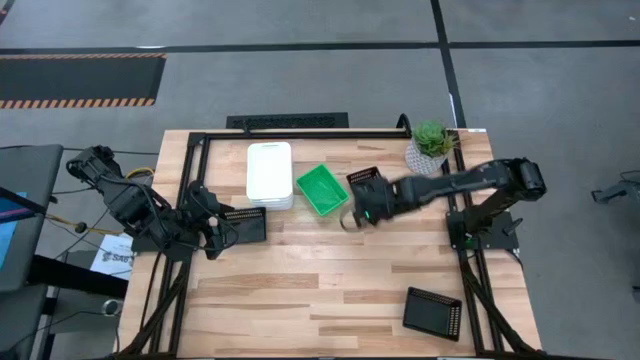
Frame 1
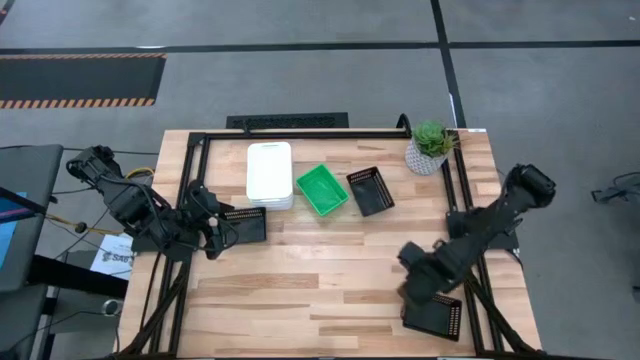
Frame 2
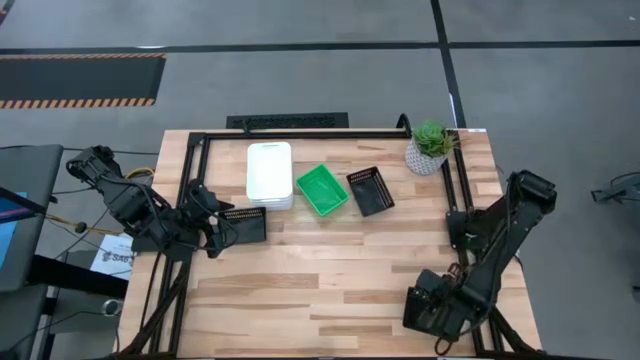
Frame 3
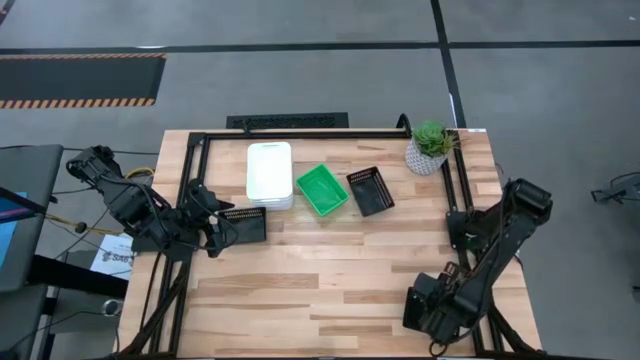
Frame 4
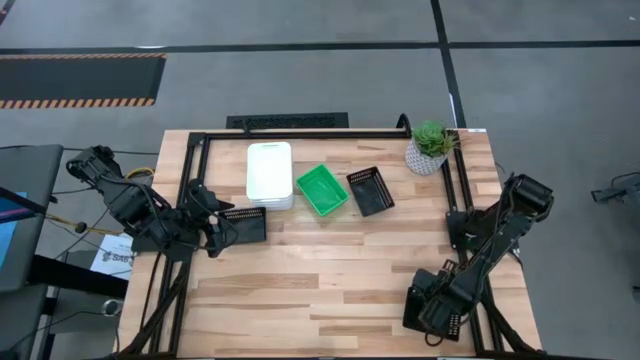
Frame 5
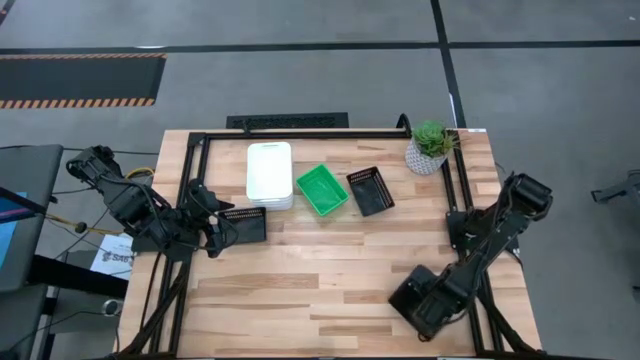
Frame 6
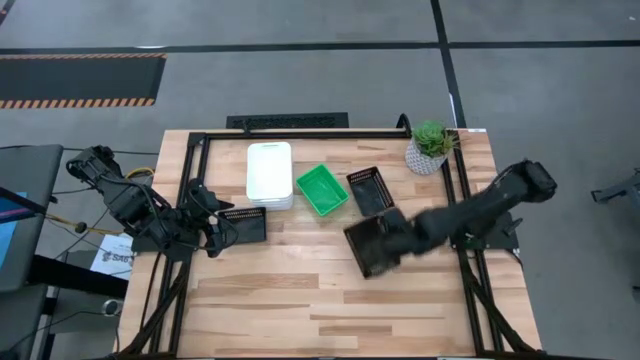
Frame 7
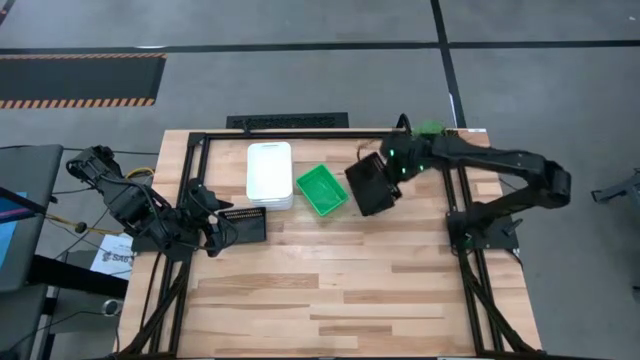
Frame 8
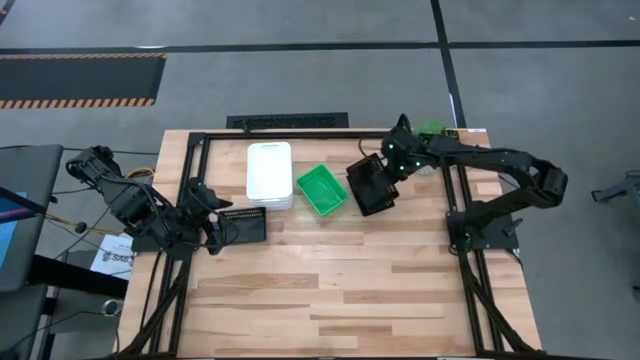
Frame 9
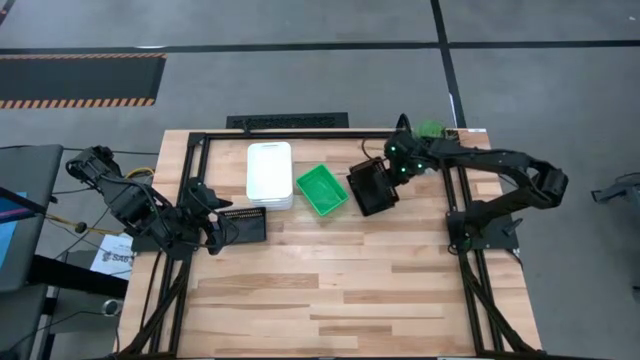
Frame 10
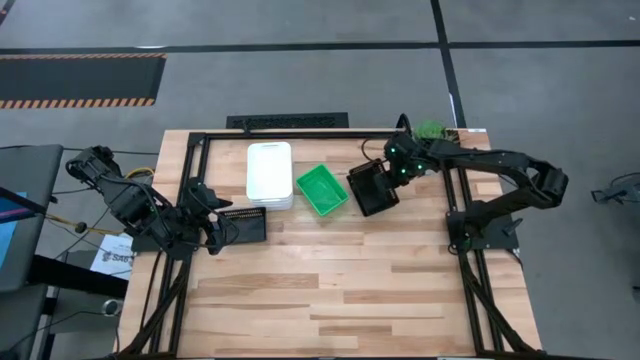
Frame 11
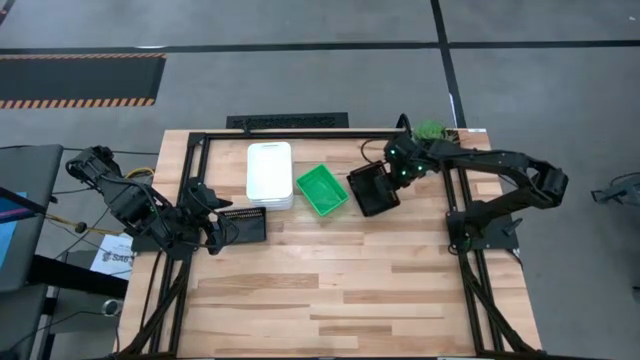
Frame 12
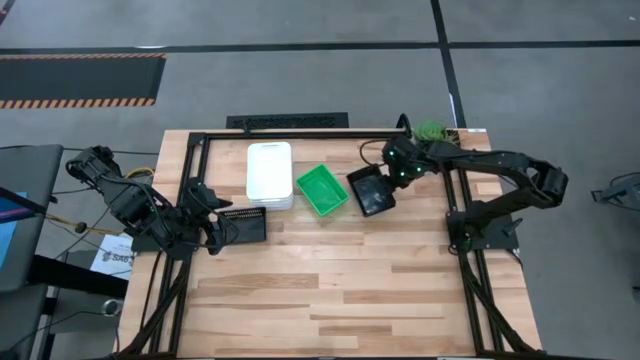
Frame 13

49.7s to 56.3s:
Stack the bottom black bin on top of the top black bin

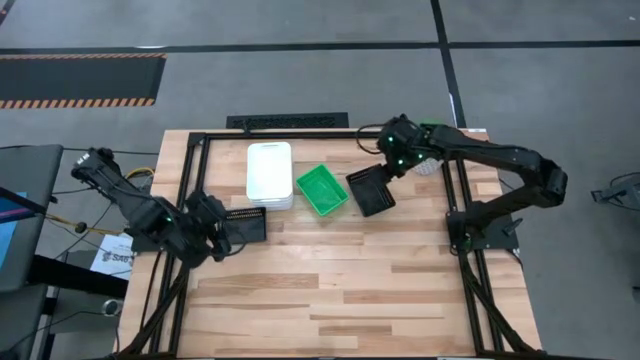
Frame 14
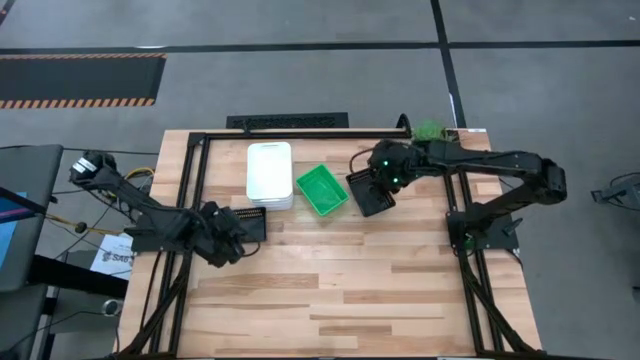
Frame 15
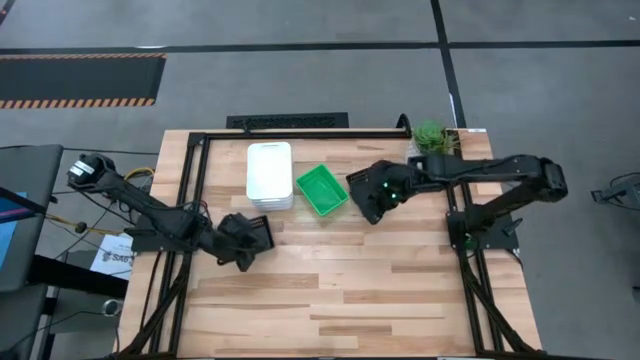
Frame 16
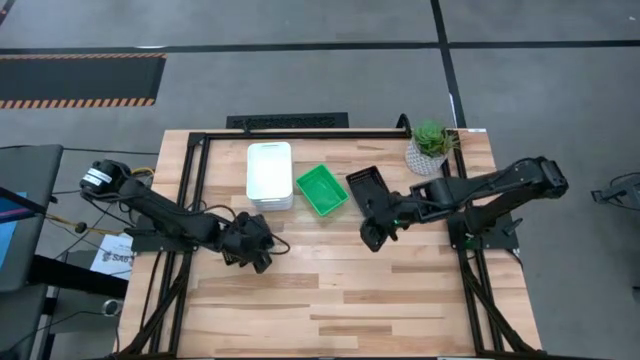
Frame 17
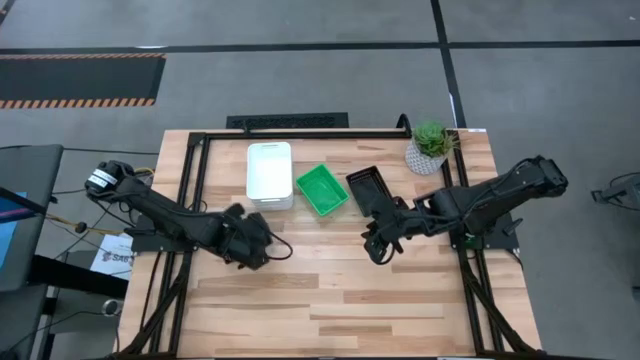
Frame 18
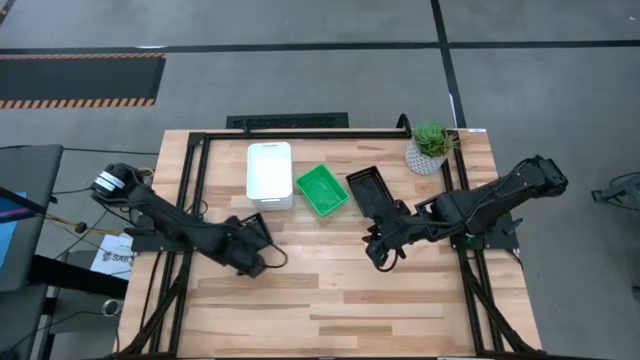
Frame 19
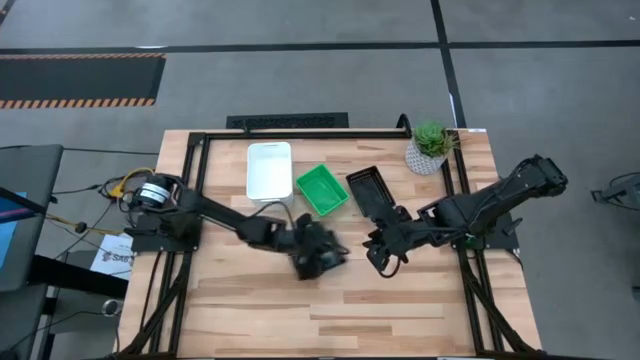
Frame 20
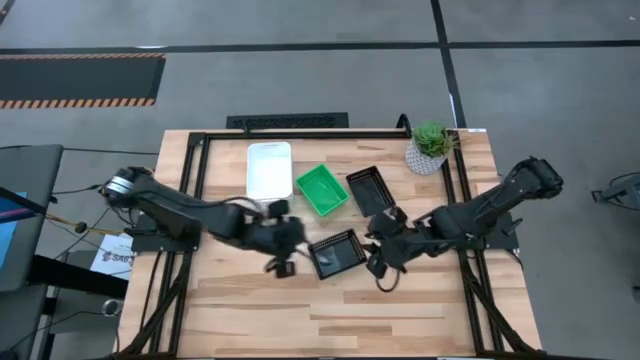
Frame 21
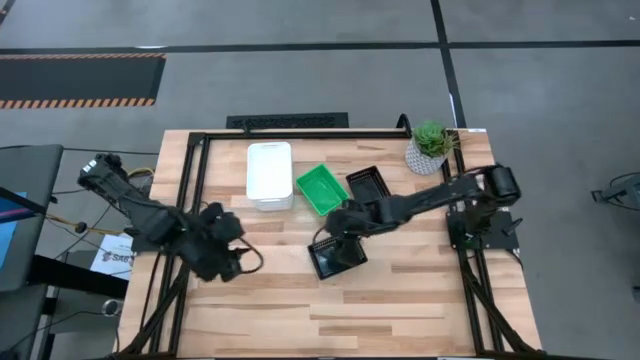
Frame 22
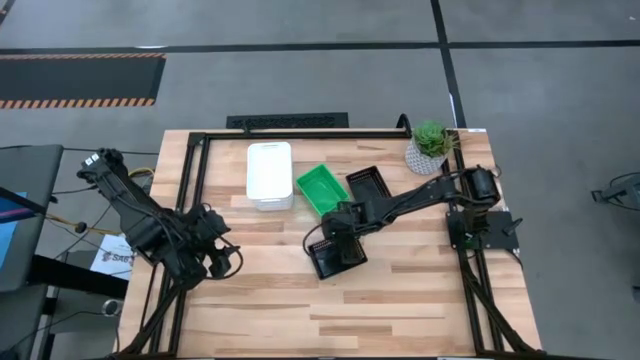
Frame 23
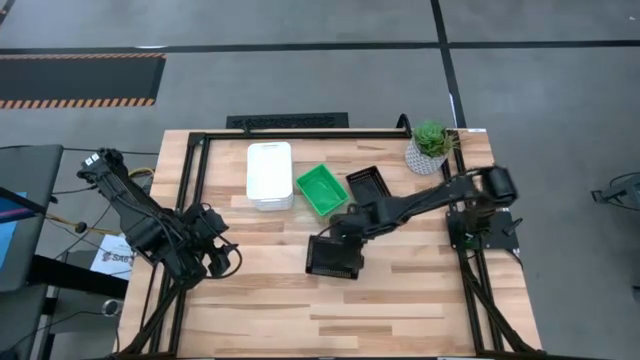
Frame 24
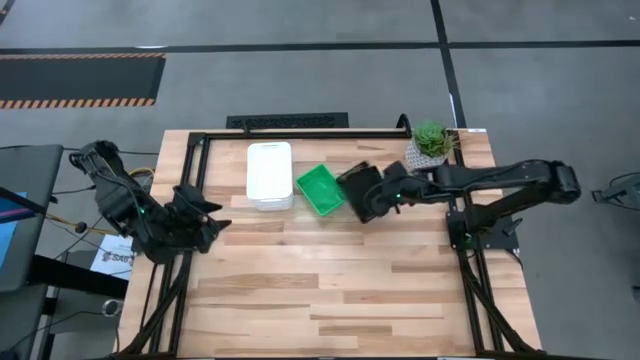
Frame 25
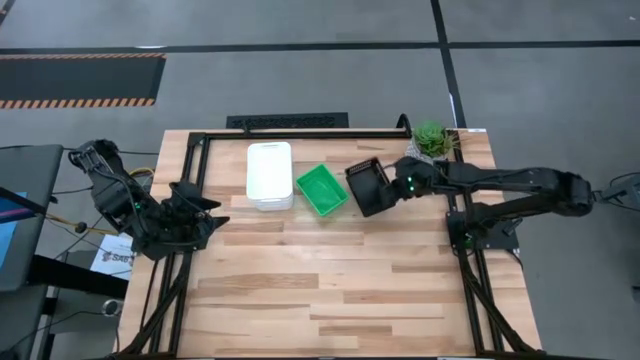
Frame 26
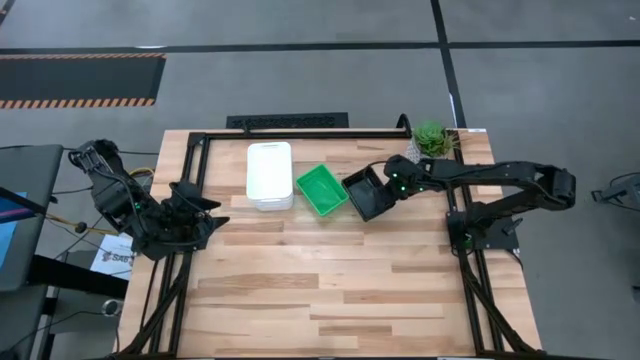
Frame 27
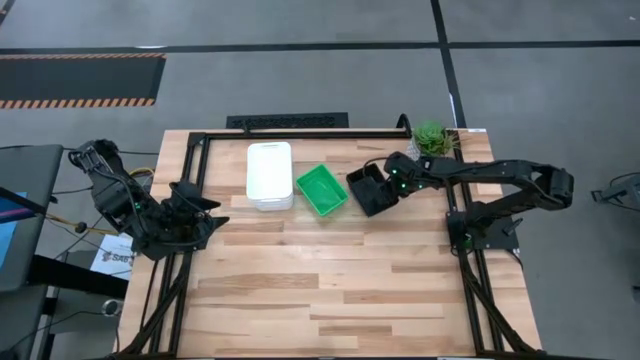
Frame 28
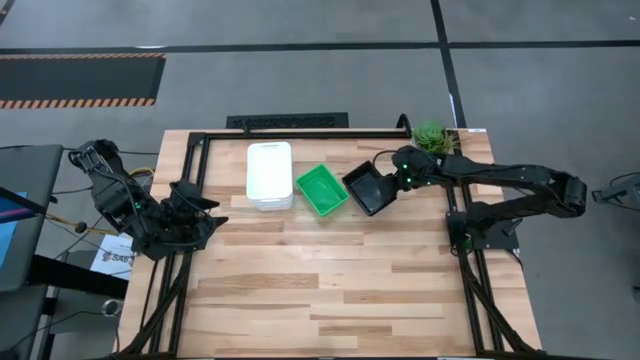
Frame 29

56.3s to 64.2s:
Stack the bottom black bin on top of the top black bins

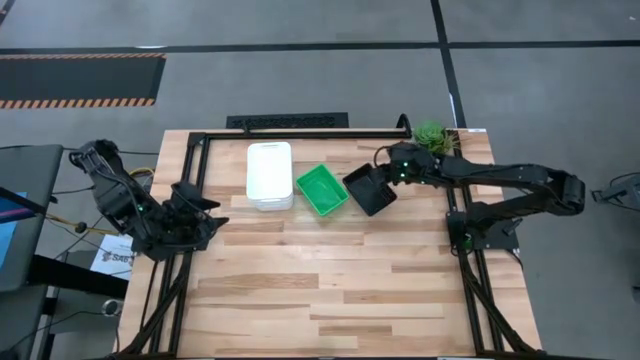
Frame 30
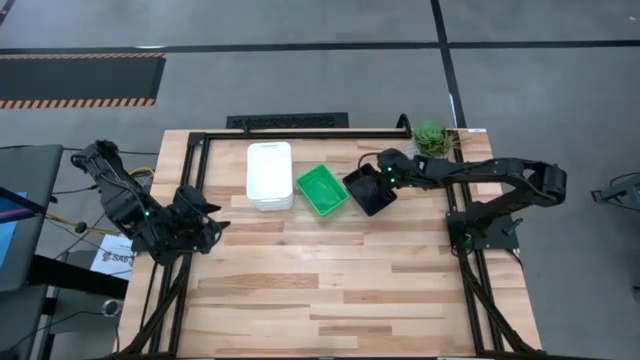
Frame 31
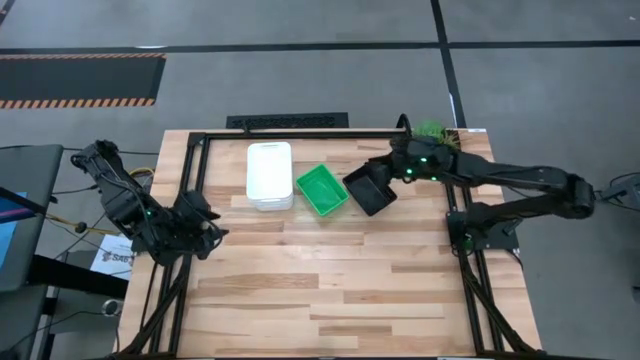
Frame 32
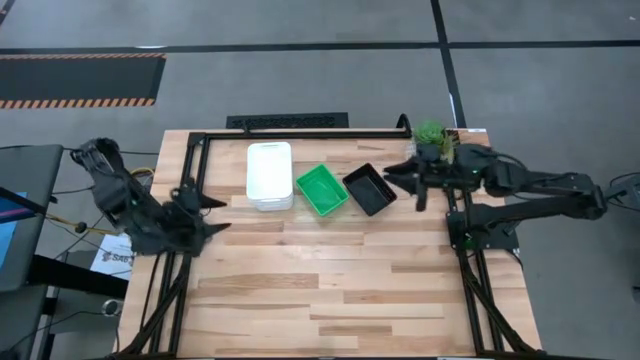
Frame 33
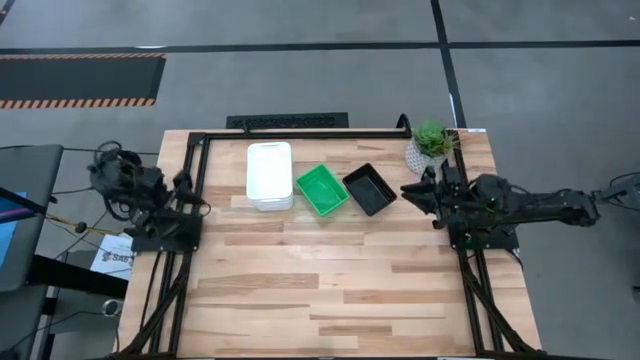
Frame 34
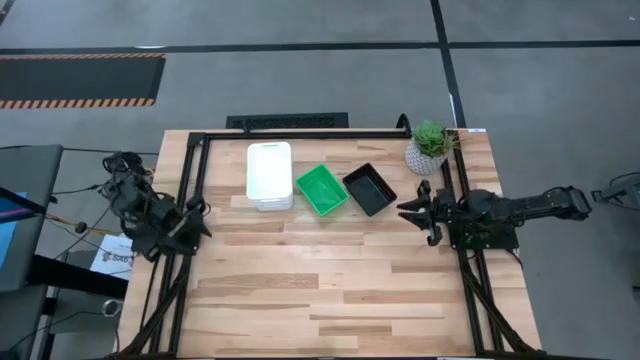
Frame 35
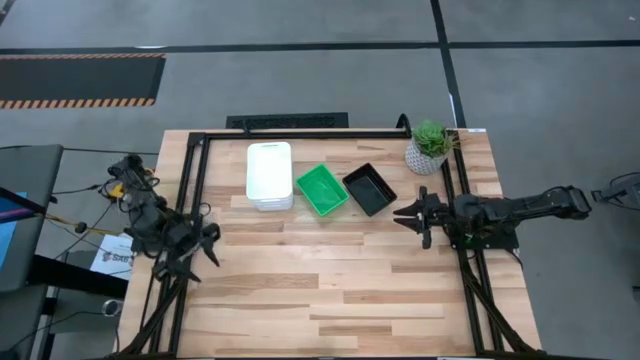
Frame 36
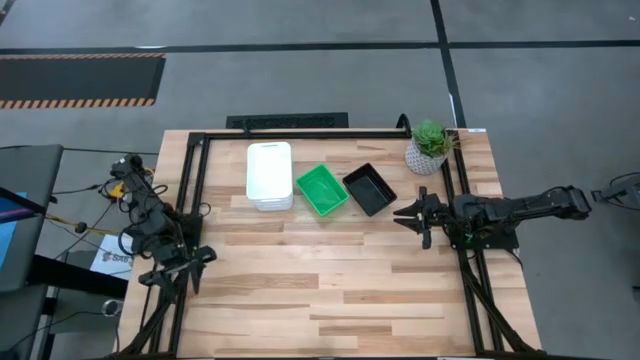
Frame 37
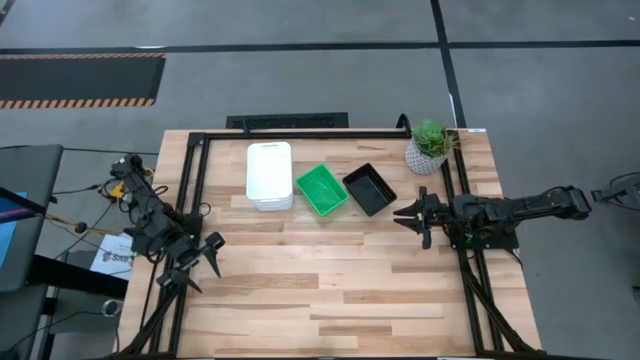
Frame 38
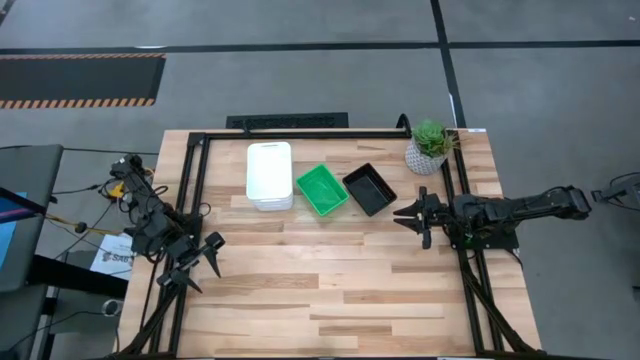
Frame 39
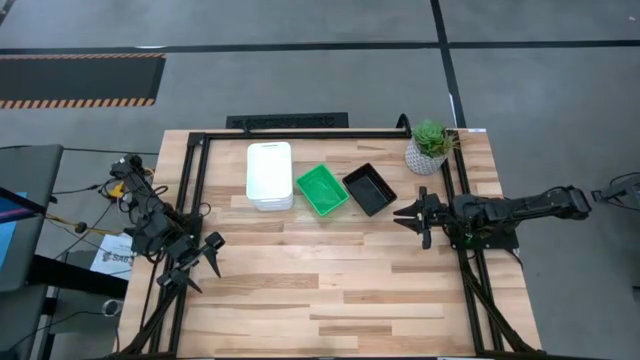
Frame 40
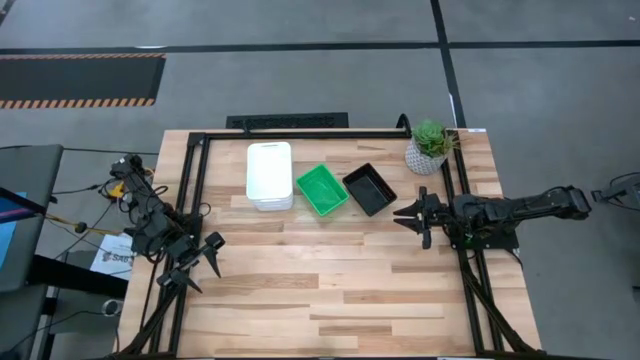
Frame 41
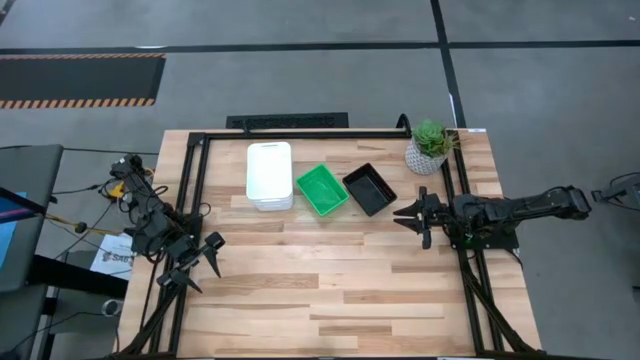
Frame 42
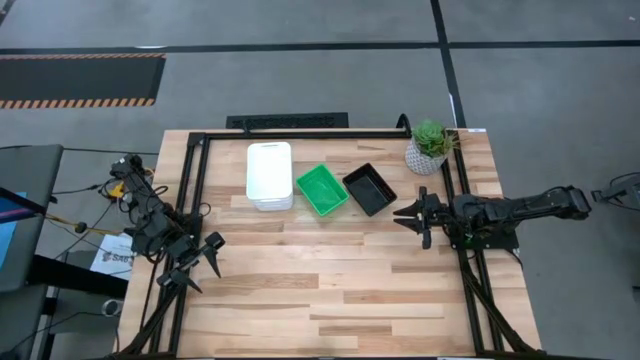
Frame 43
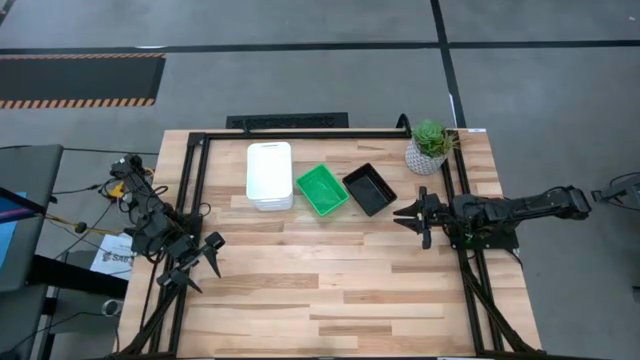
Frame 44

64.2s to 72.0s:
Return to Home Position
